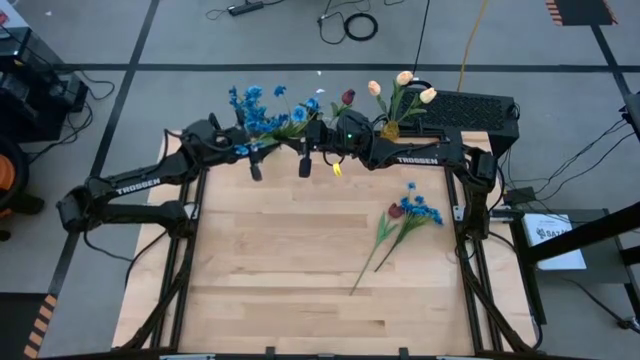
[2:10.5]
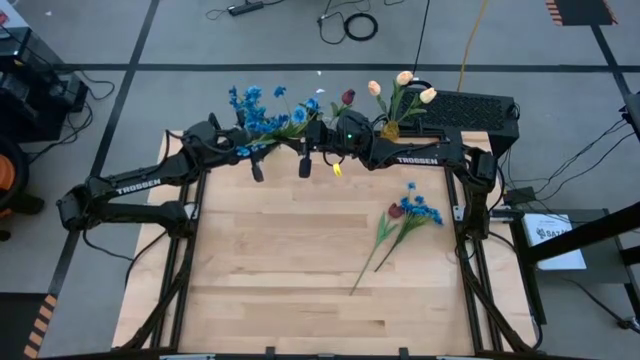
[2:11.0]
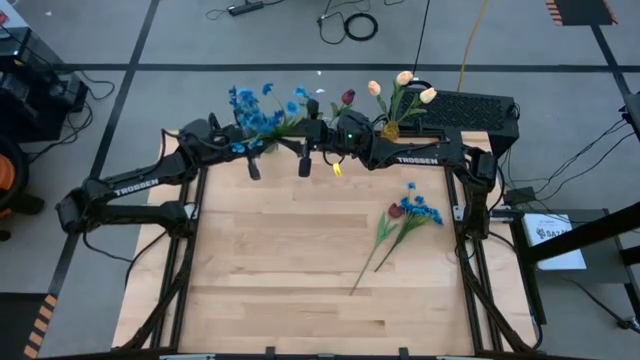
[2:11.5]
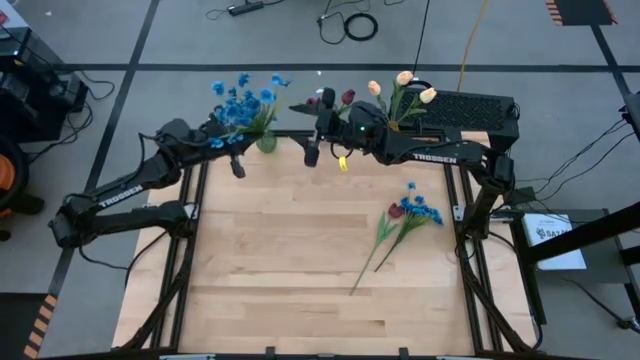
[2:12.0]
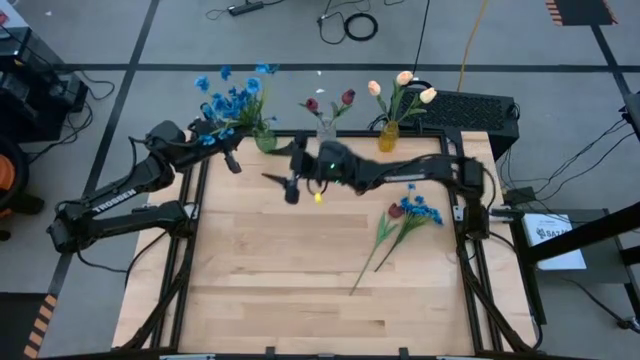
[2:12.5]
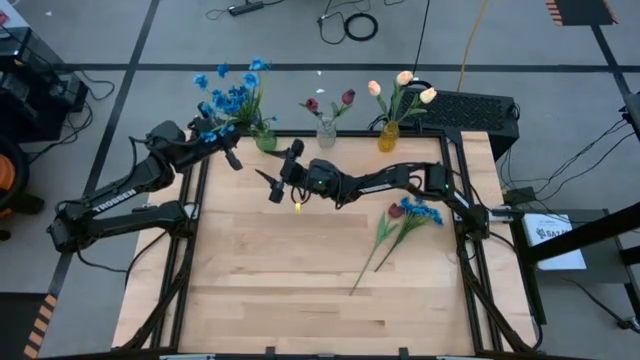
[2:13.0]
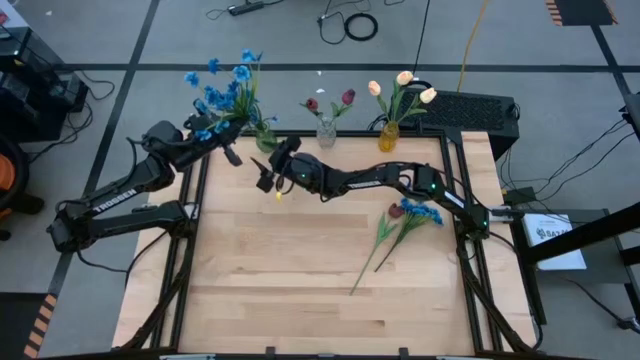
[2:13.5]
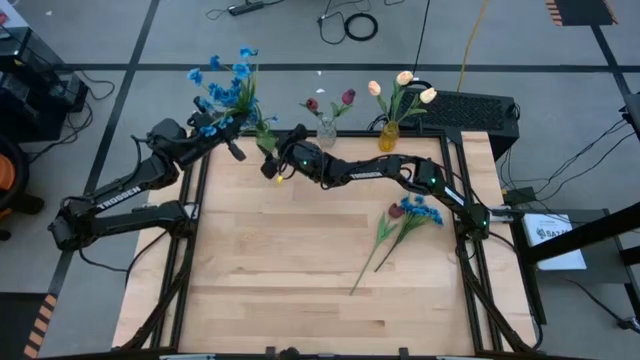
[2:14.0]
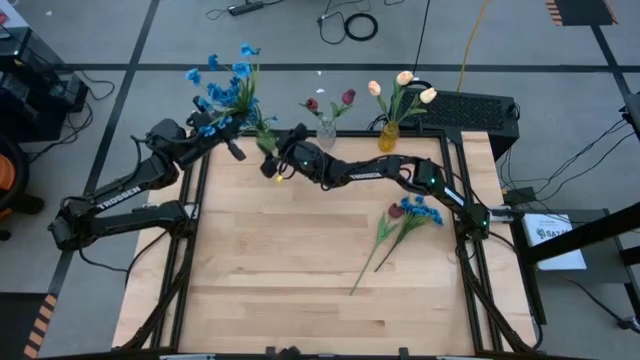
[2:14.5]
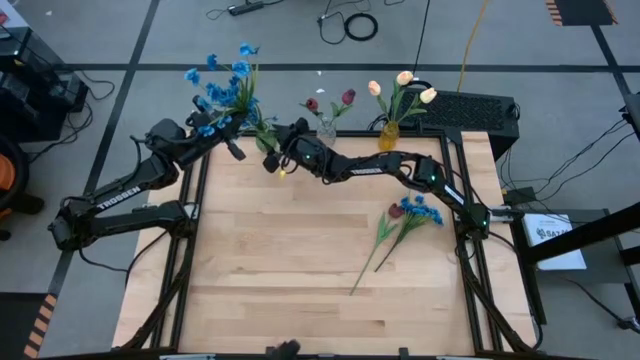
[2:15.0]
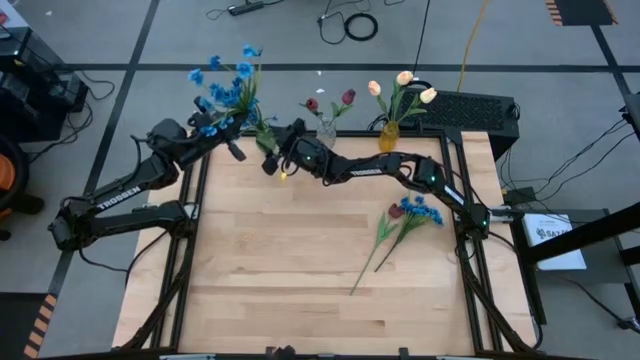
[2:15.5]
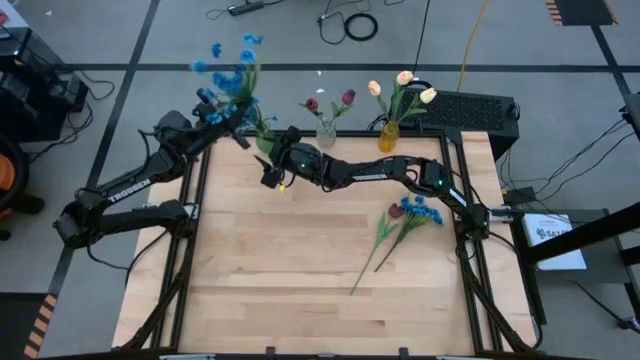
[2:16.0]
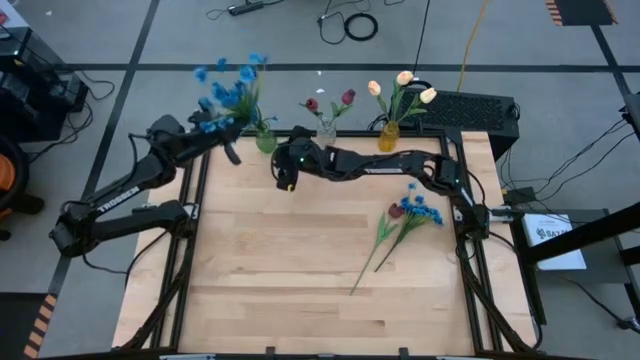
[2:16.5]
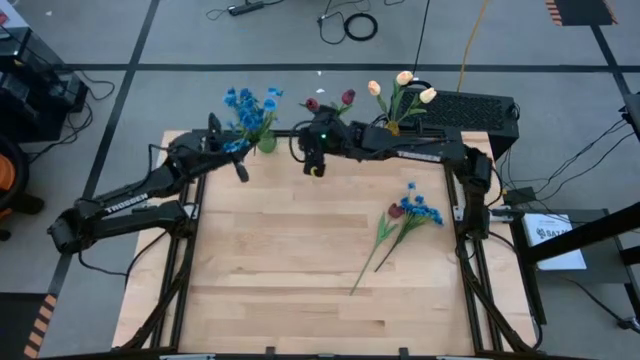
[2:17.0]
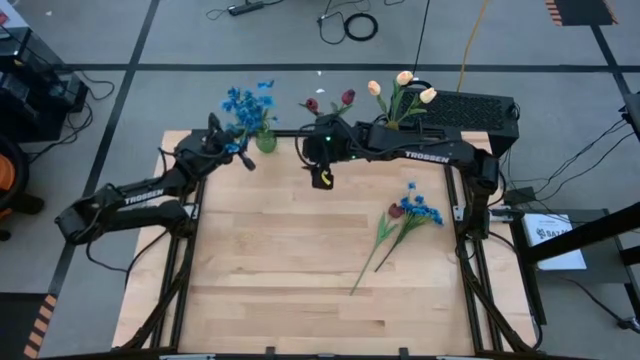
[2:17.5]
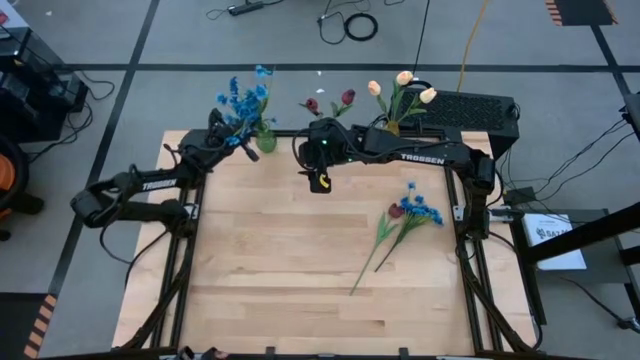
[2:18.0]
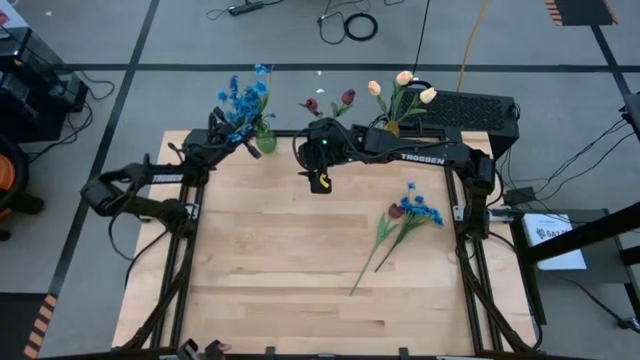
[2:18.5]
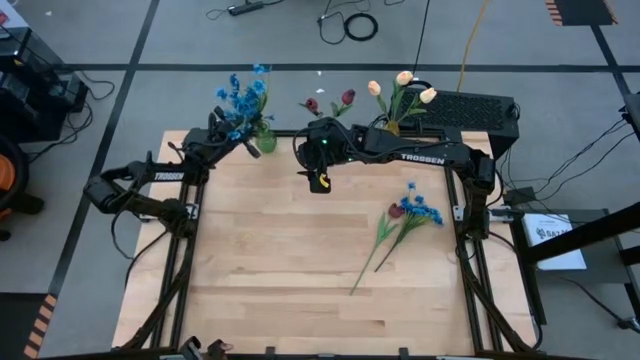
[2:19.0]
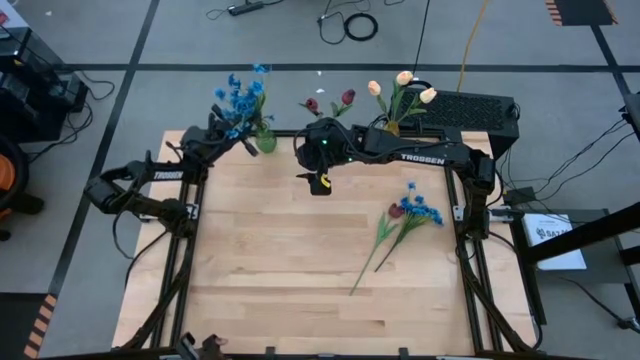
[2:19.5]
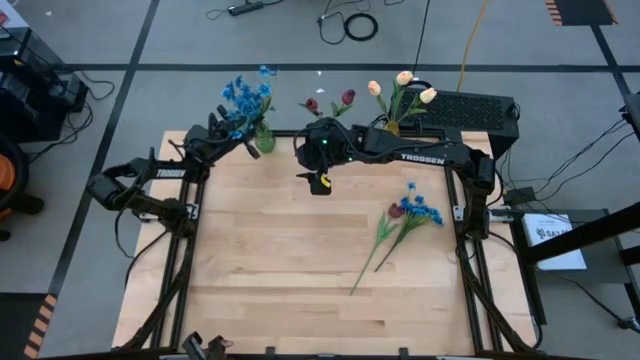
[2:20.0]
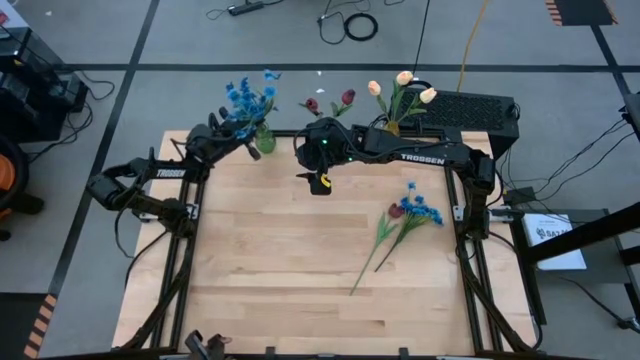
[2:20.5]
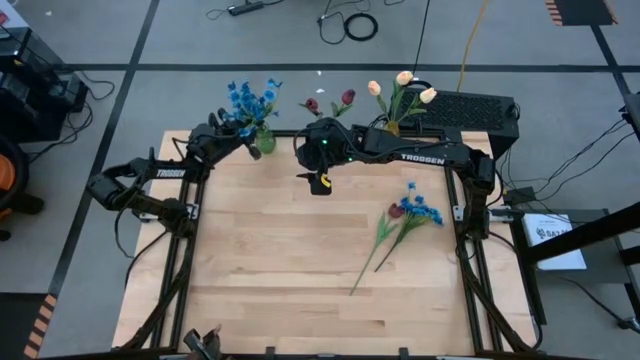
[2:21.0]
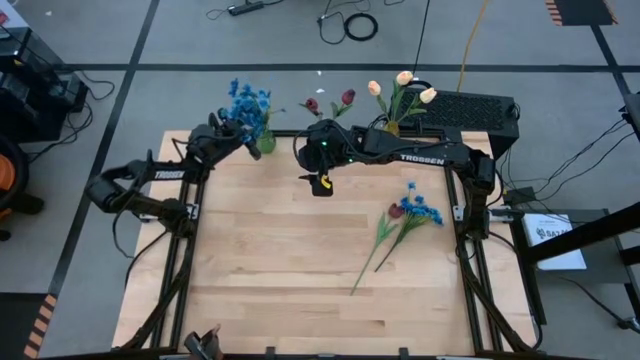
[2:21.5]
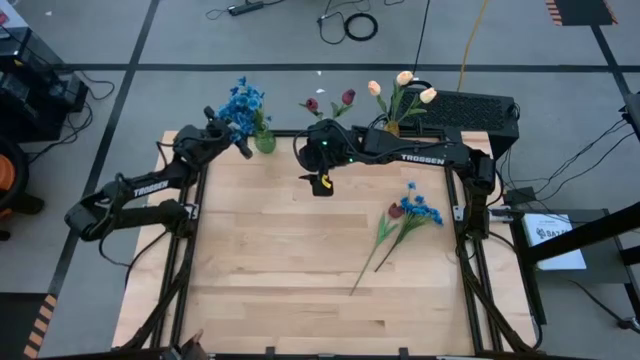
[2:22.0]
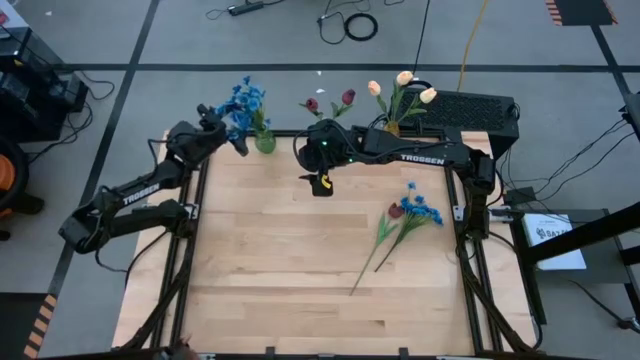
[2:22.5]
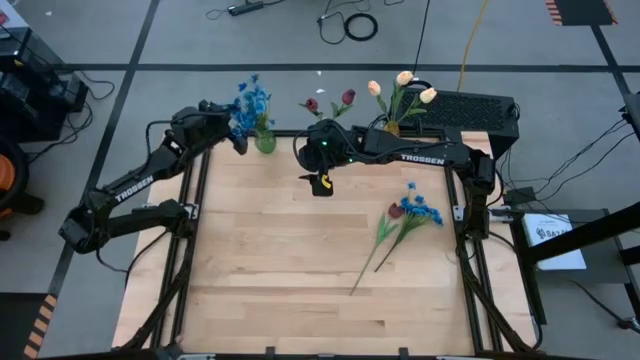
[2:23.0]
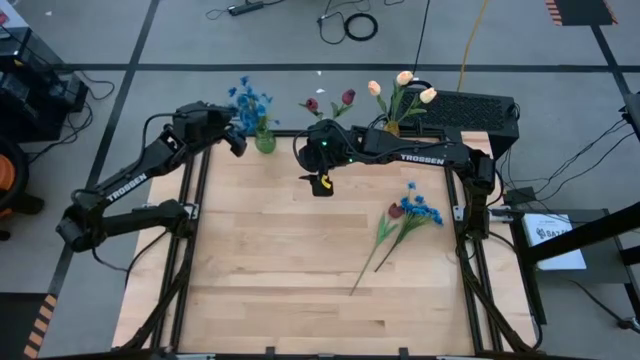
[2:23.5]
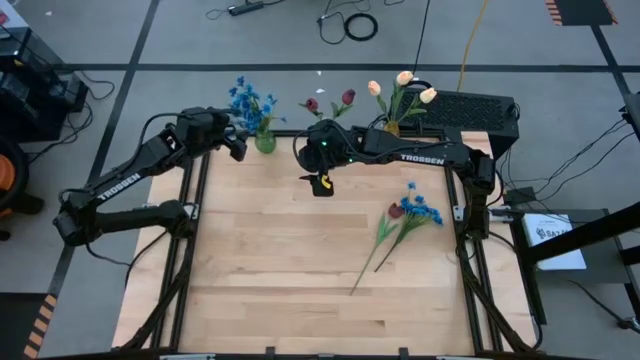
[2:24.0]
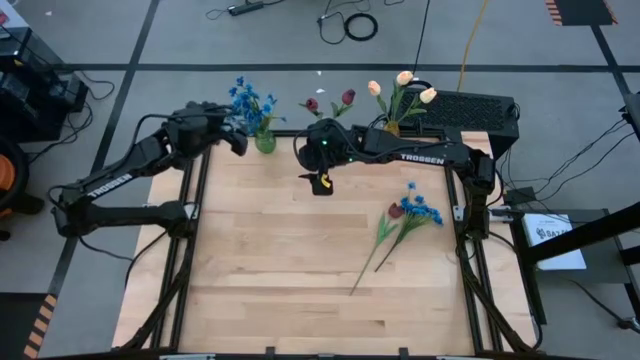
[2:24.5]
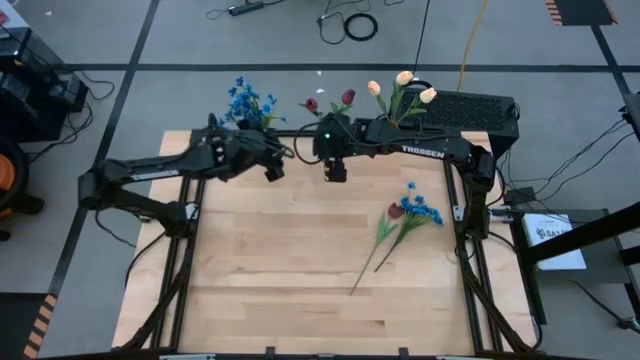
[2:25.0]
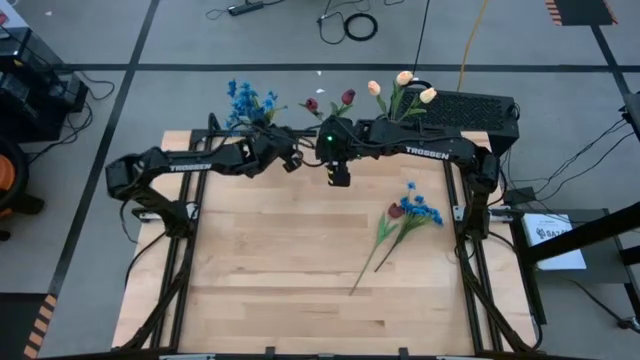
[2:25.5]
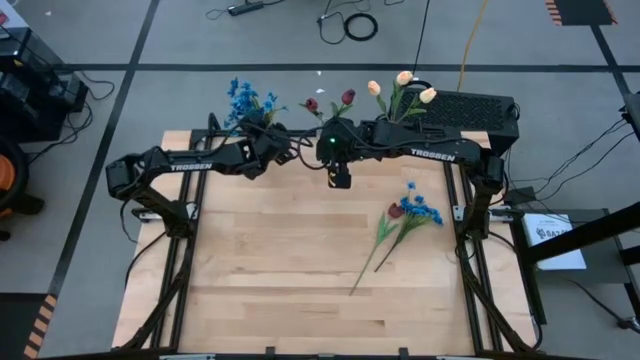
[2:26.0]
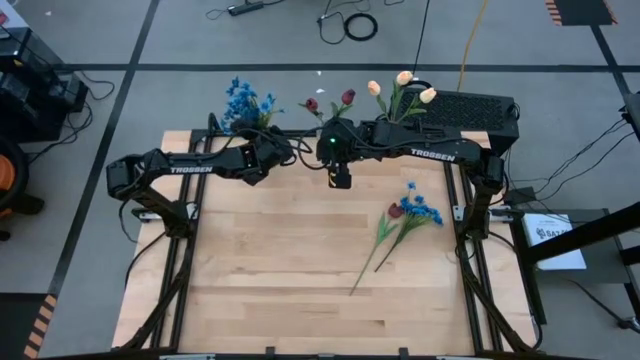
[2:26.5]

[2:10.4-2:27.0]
Task: Sort flowers into vase by color
Put the left blue flowers into the green vase

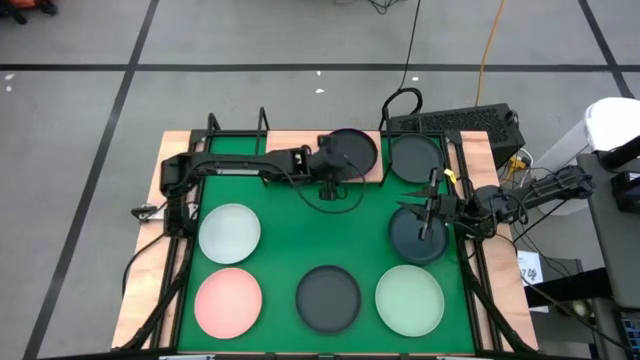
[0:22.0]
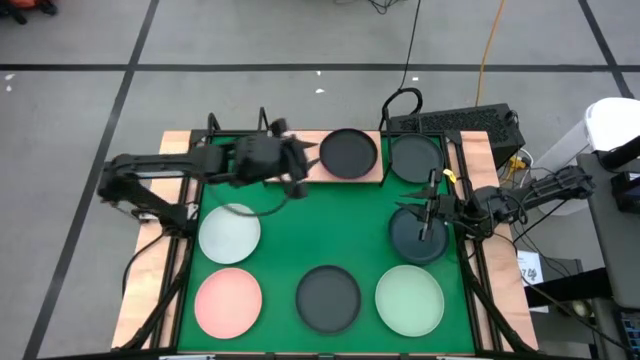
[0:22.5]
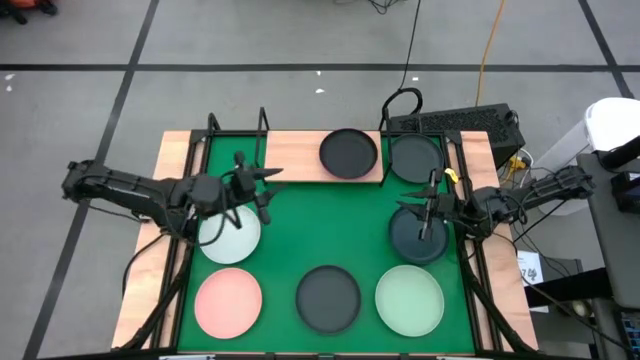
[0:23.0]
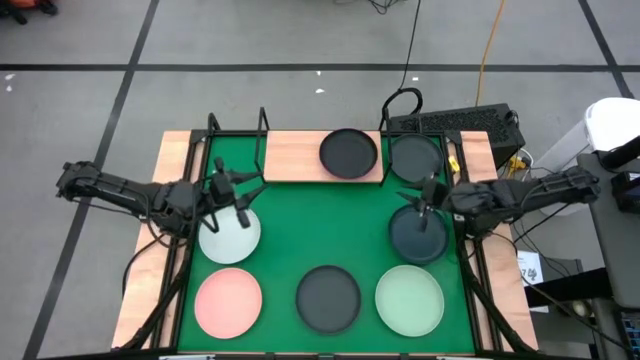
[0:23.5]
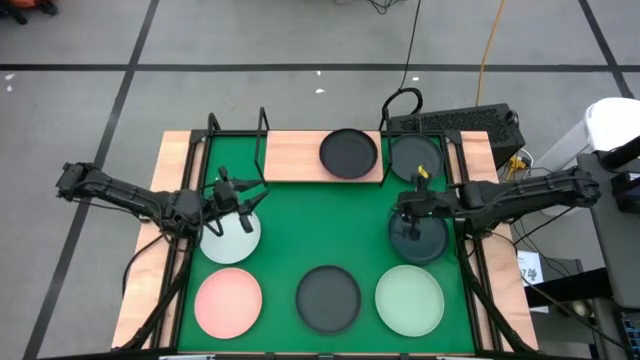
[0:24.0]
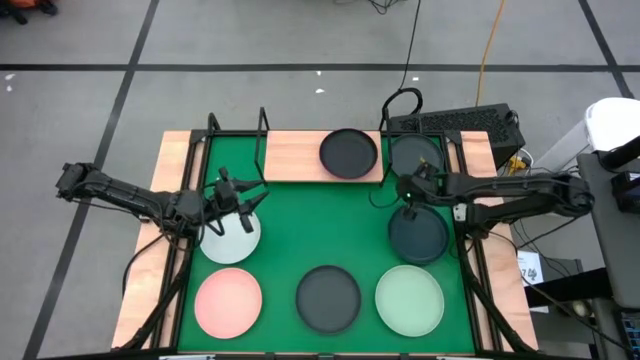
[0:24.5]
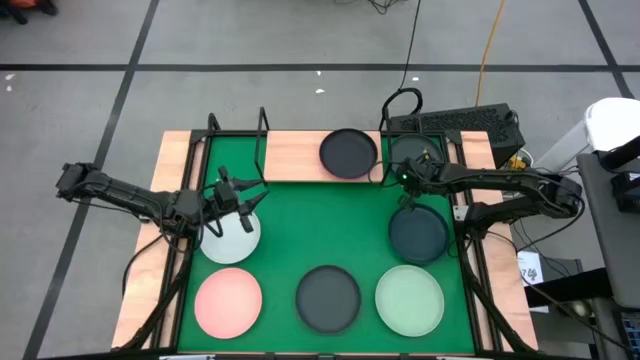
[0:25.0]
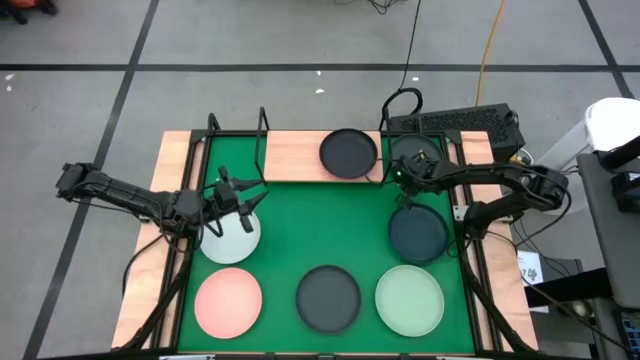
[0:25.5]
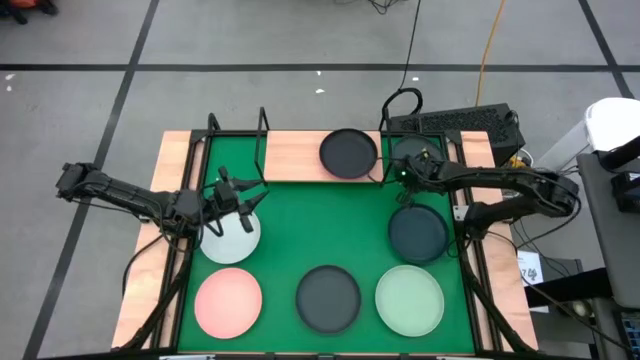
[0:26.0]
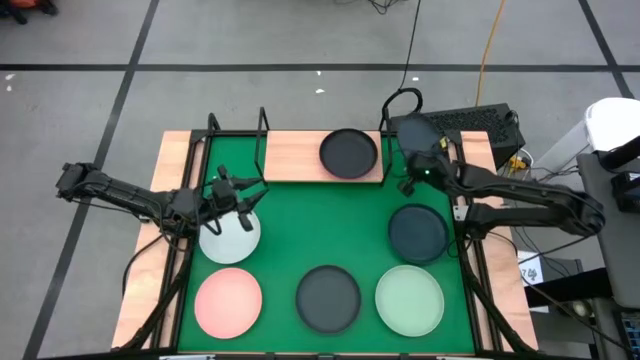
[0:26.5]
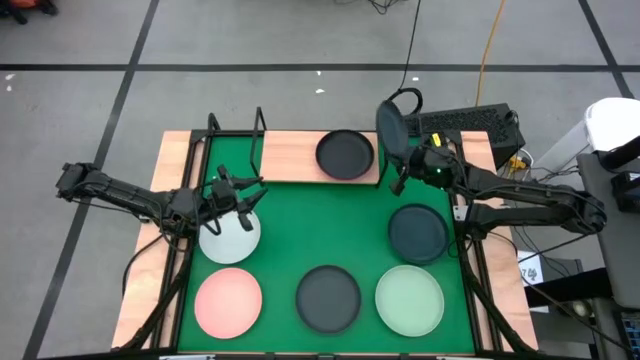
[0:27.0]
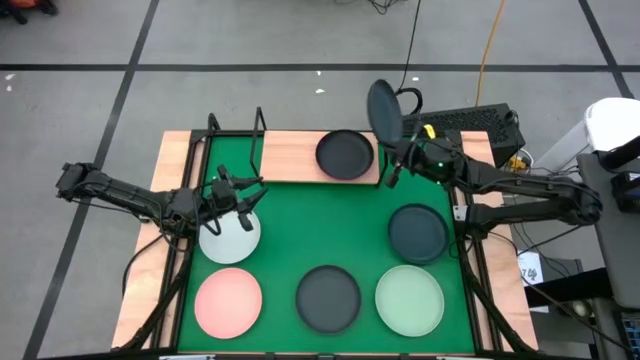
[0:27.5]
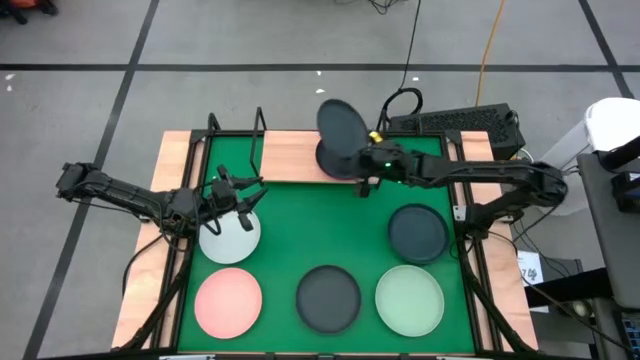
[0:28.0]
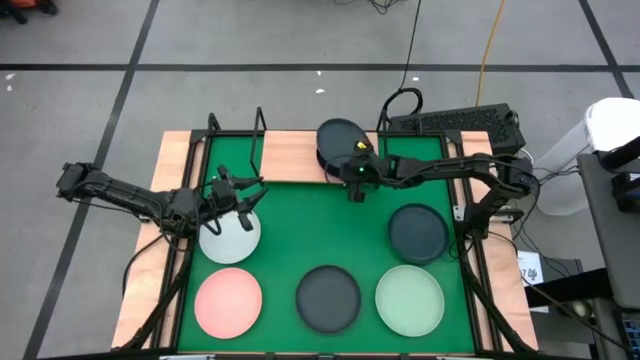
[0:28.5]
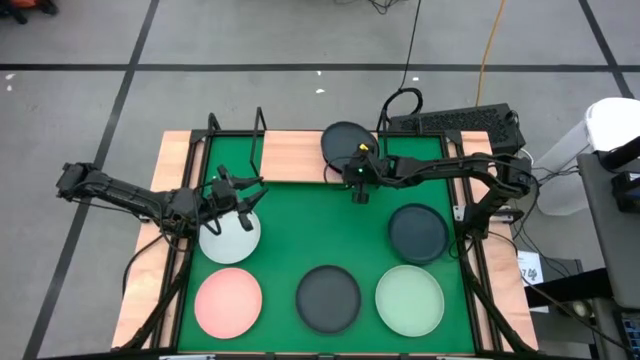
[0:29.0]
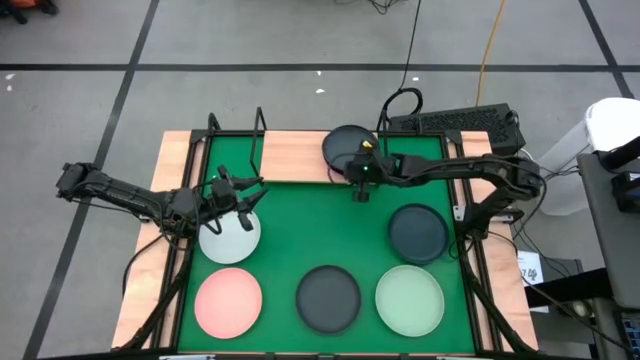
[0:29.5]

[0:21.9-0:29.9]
Task: Place and stack plates onto a shelf
Stack the dark green plate on top of the black plate on the shelf
